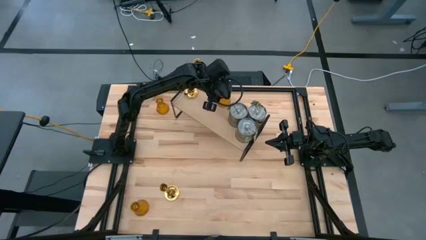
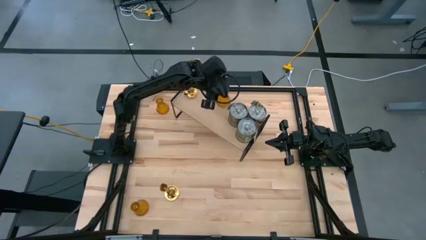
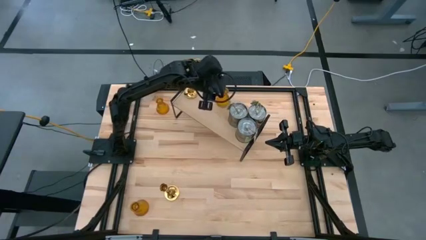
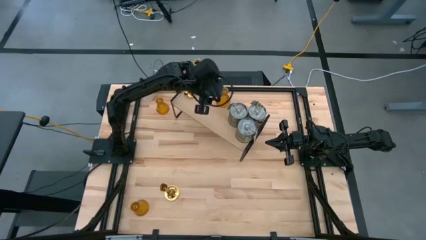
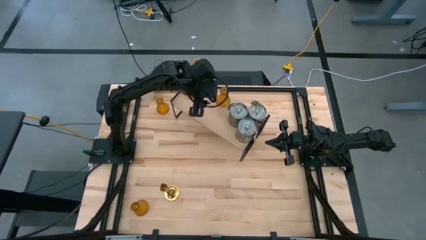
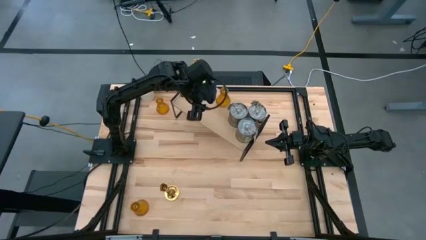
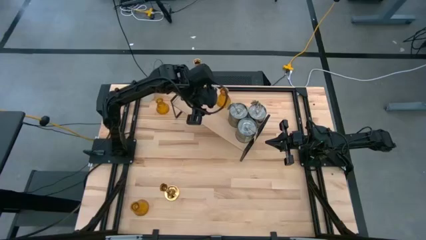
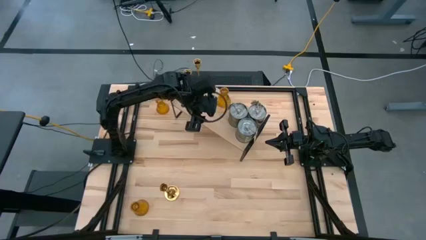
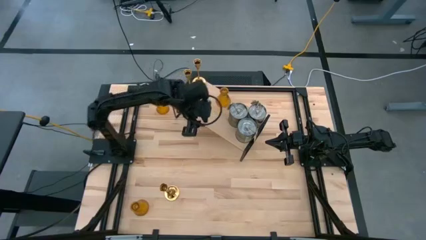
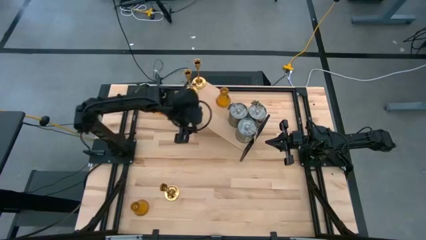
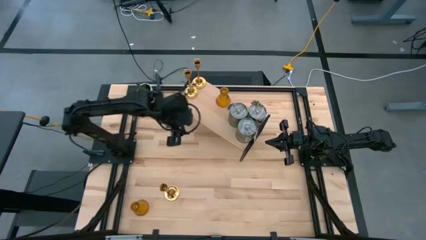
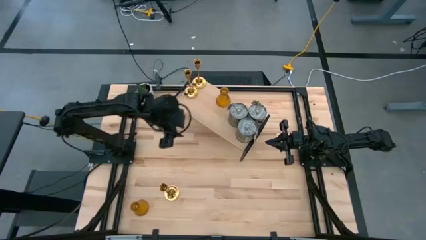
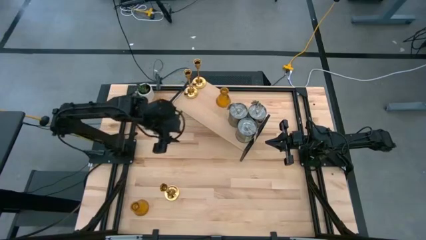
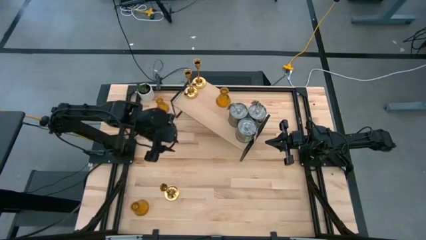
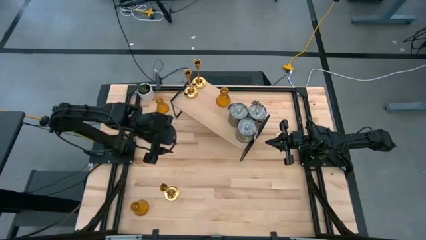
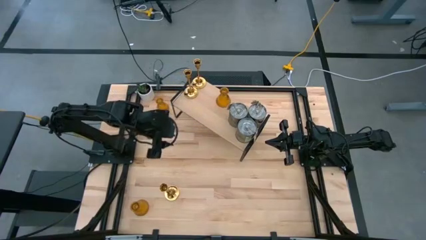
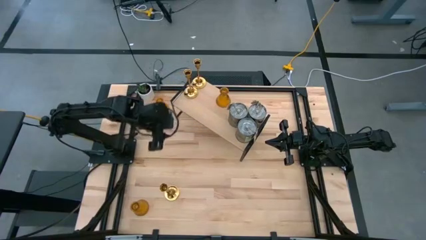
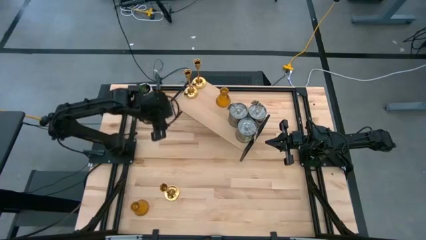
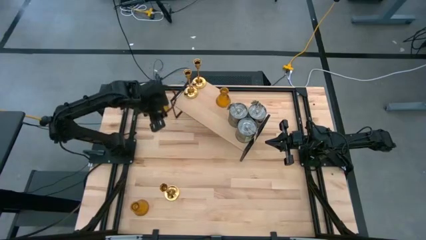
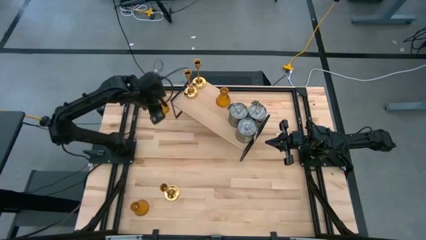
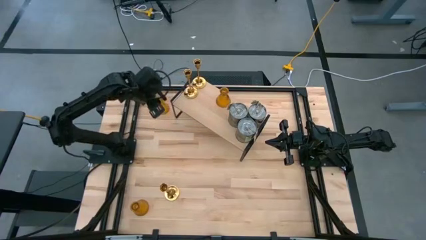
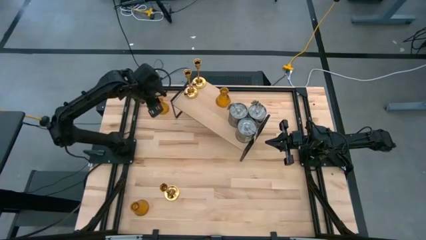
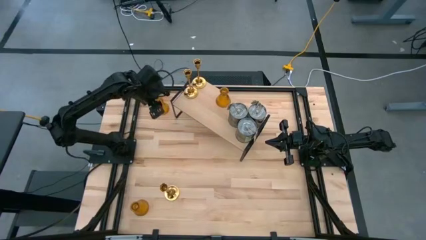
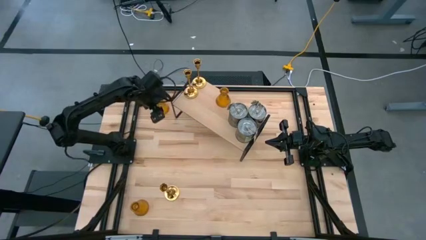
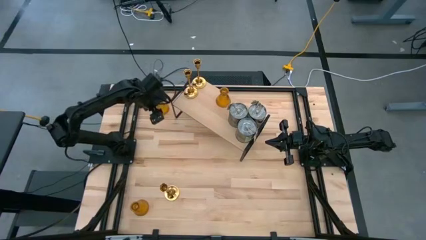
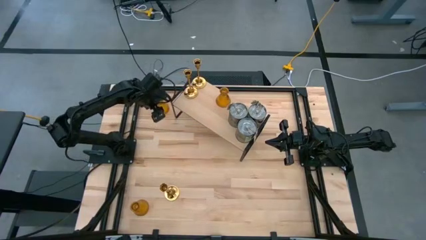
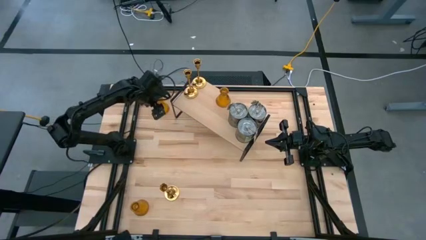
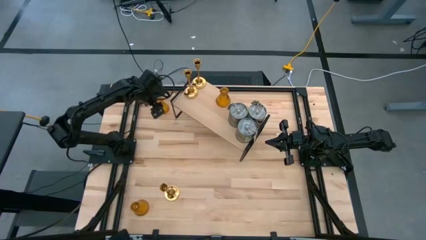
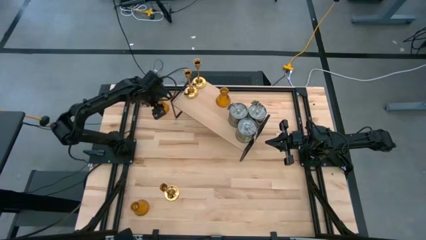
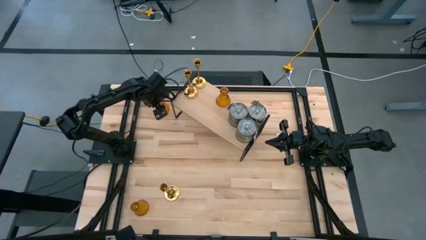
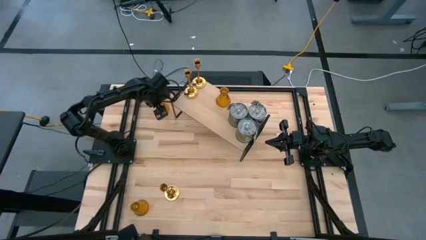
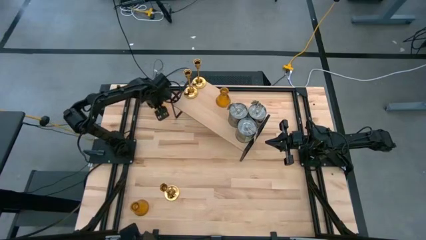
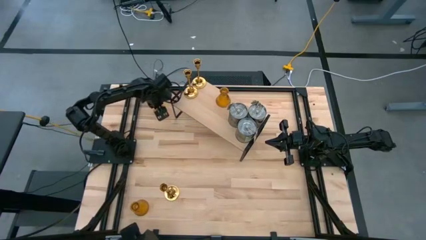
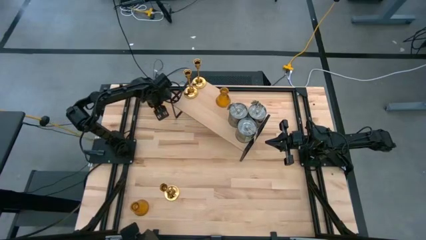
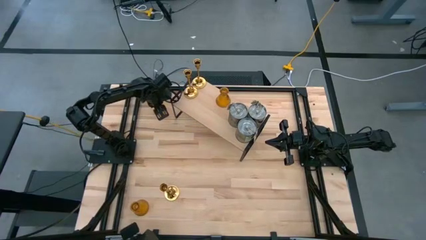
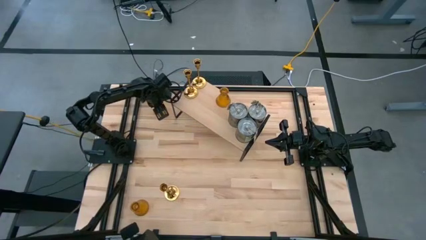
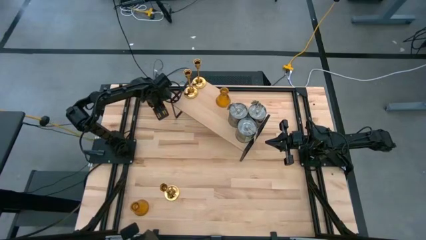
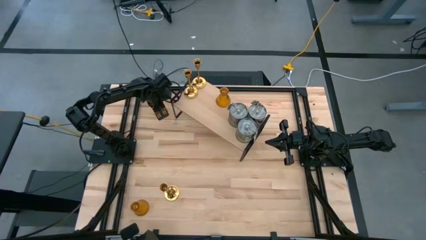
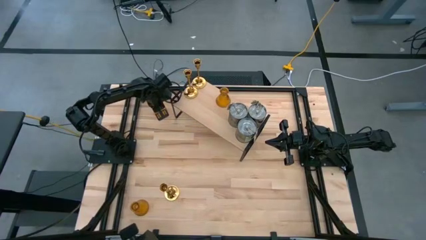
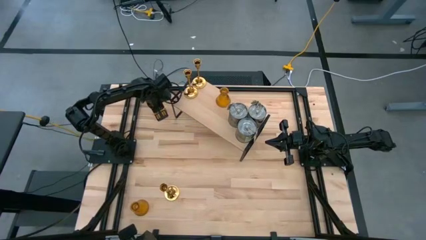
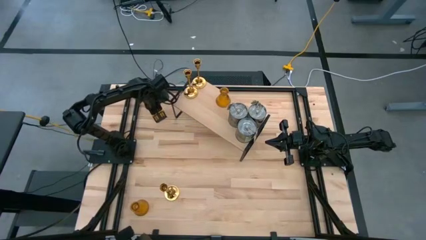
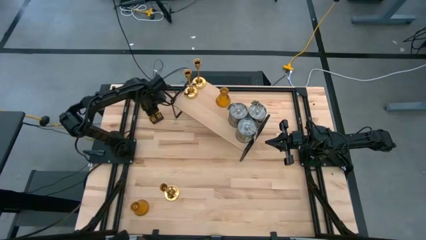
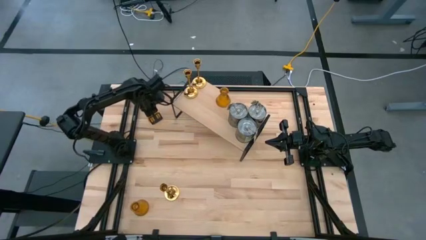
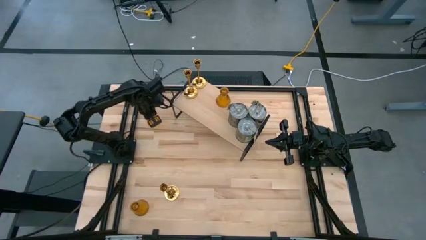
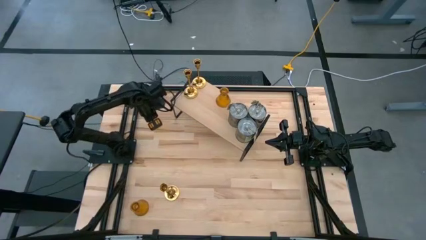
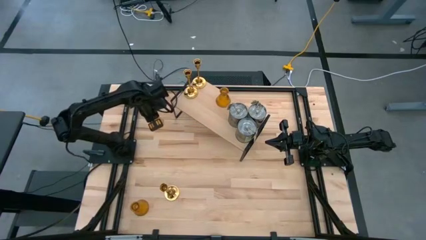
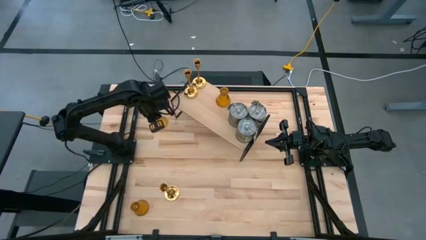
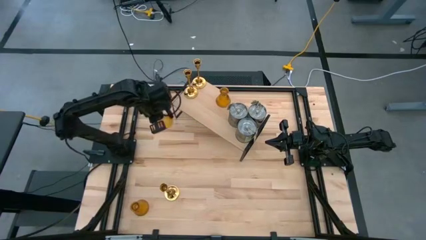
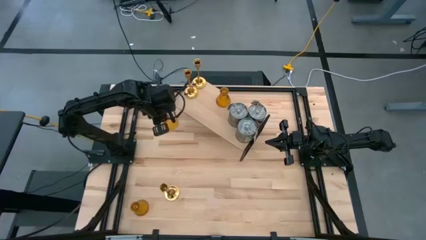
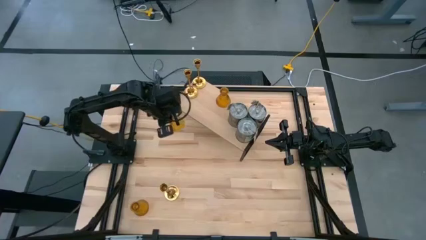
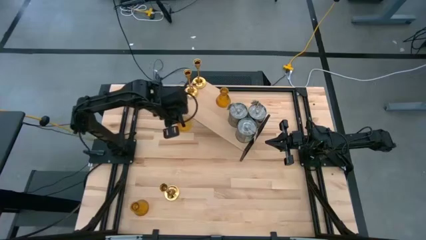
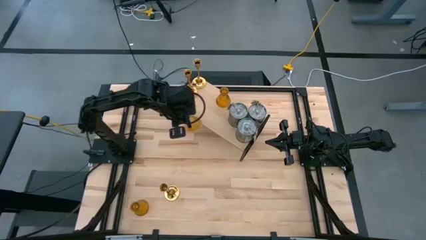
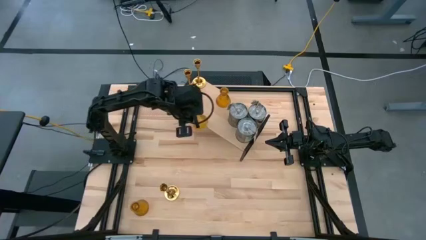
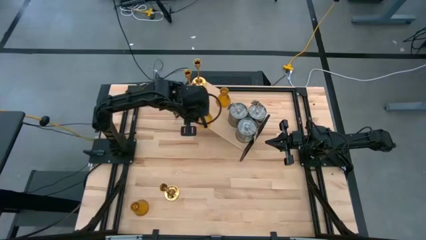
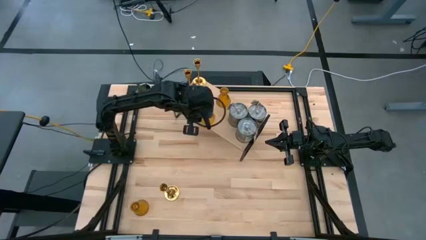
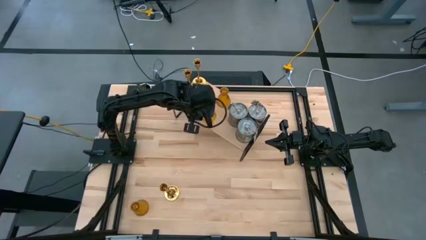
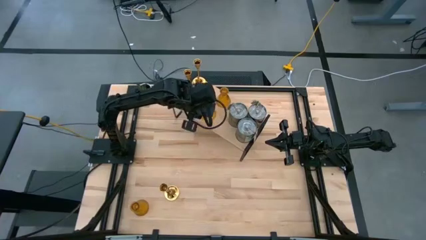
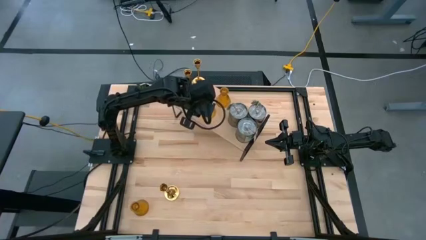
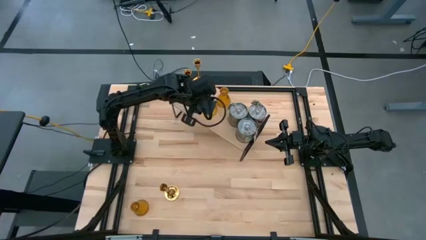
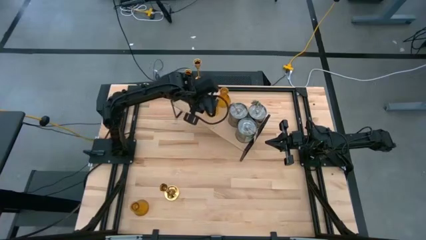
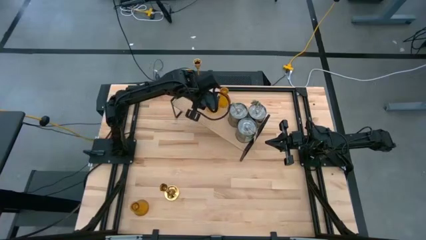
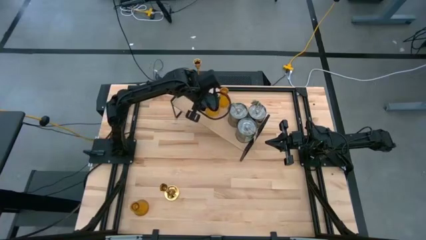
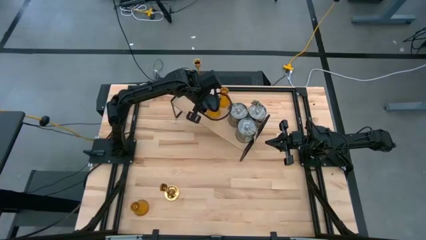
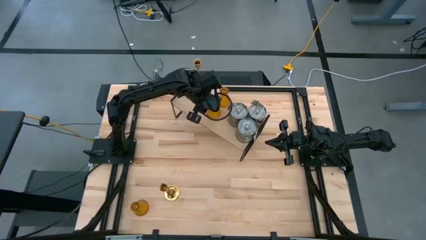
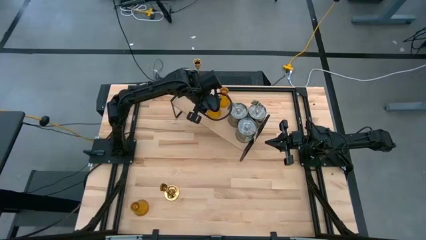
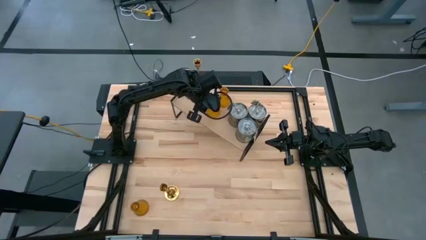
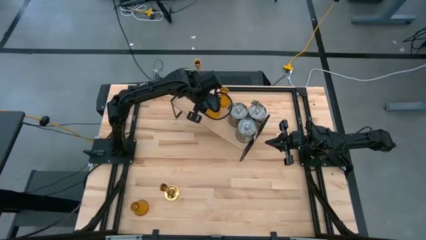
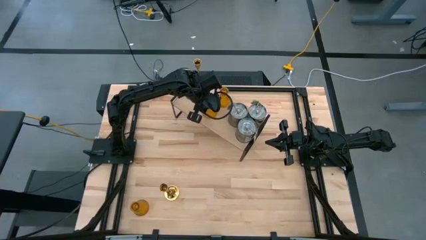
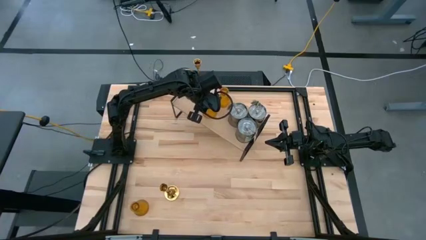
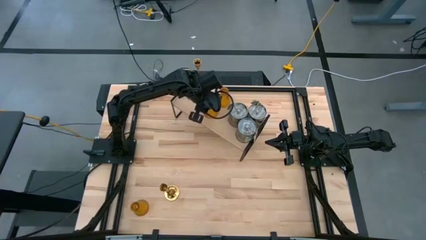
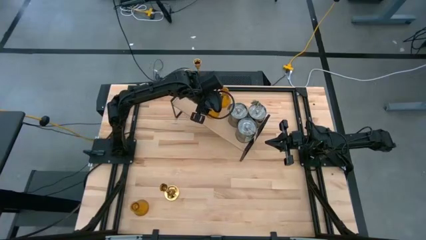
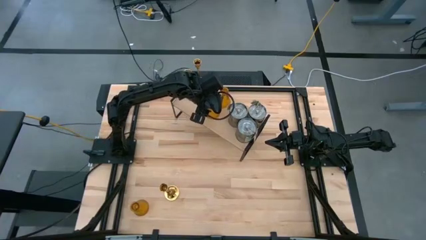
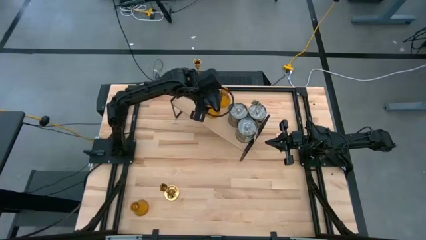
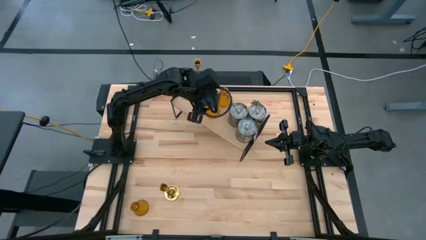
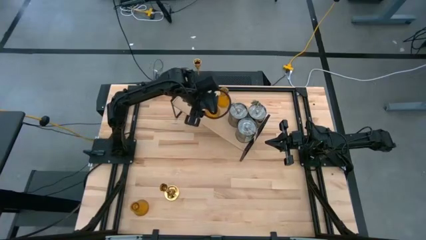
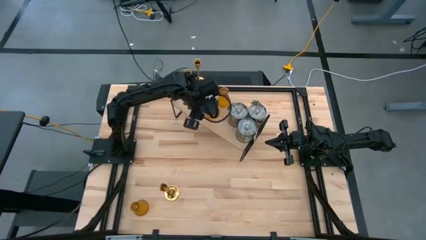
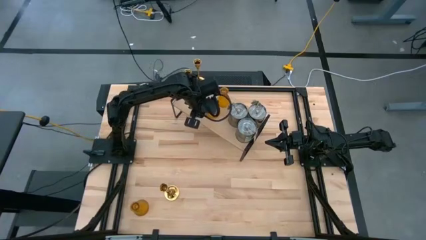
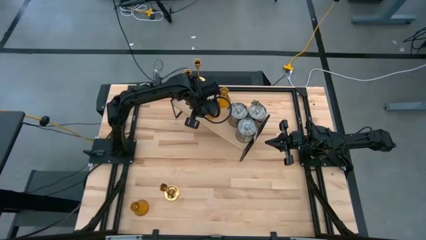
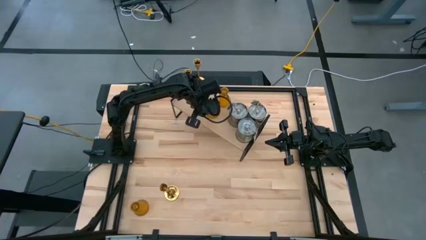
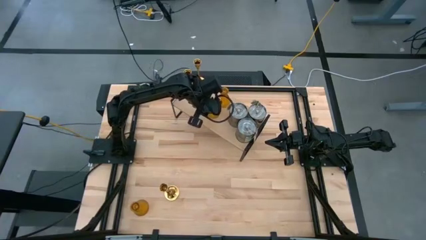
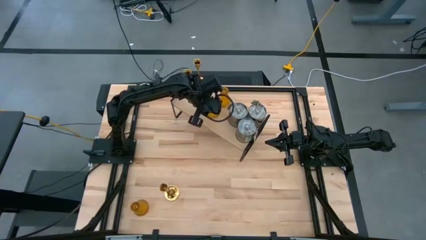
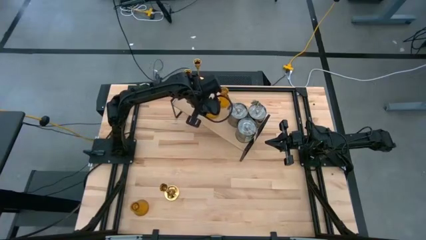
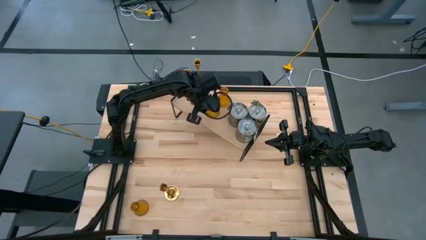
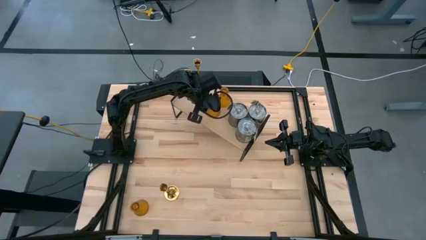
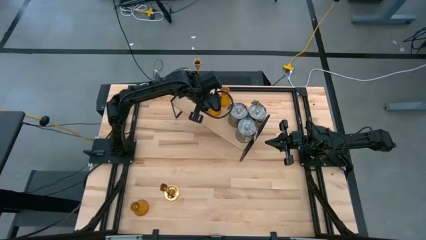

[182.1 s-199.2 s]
Task: Pick & Place candle stick holders
Put the top yellow candle holder on the shelf aligned with the other yellow candle holder
